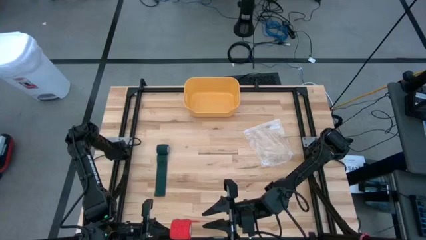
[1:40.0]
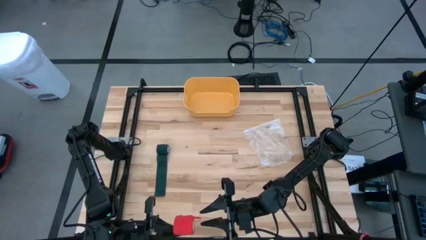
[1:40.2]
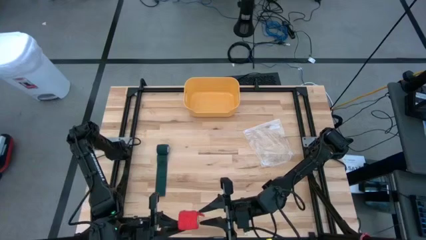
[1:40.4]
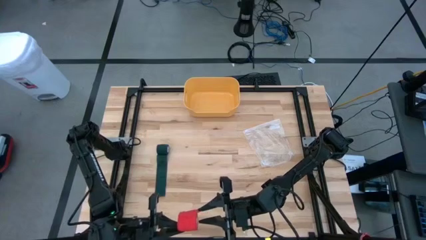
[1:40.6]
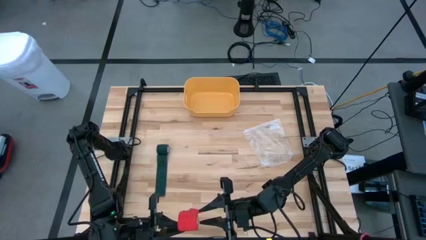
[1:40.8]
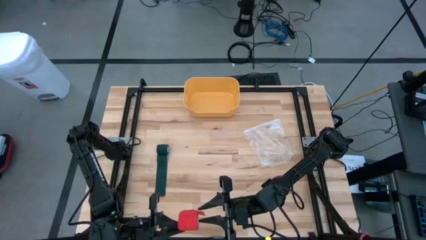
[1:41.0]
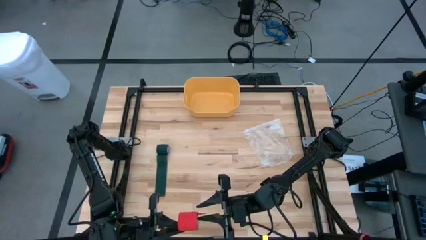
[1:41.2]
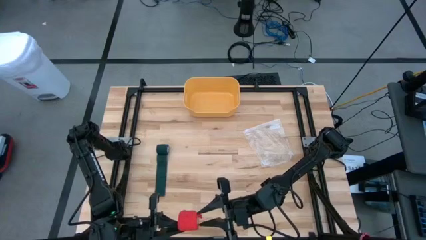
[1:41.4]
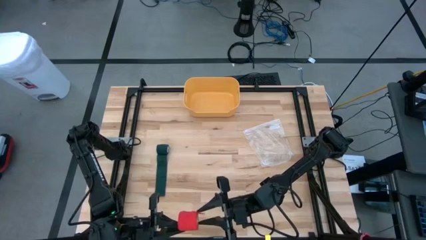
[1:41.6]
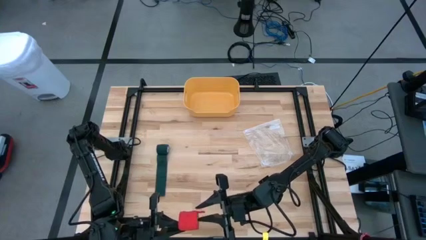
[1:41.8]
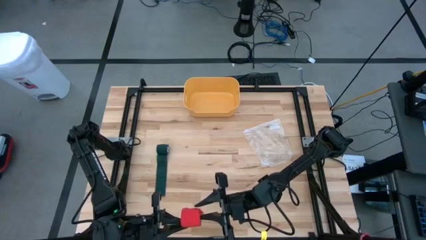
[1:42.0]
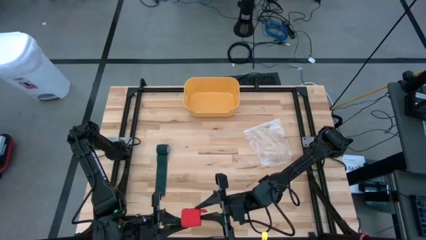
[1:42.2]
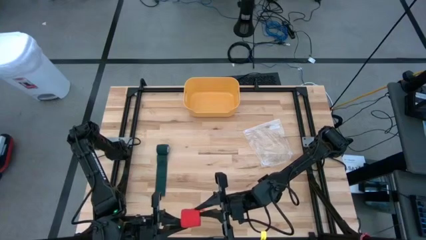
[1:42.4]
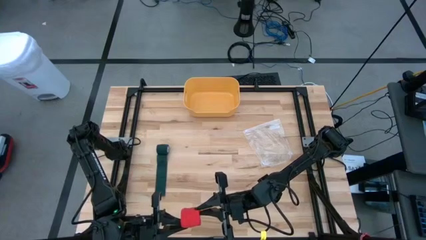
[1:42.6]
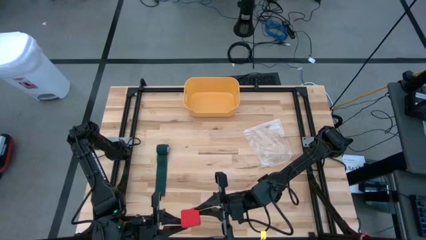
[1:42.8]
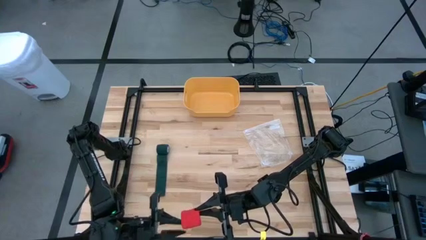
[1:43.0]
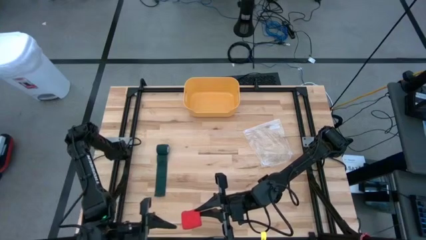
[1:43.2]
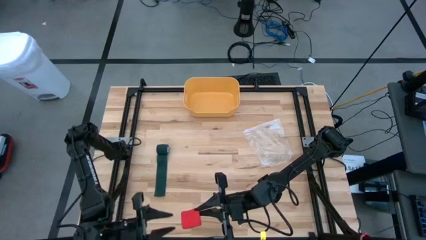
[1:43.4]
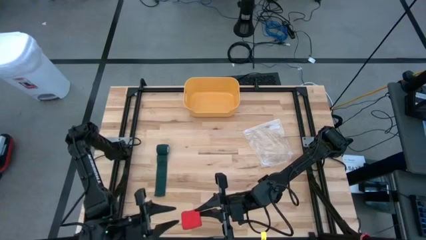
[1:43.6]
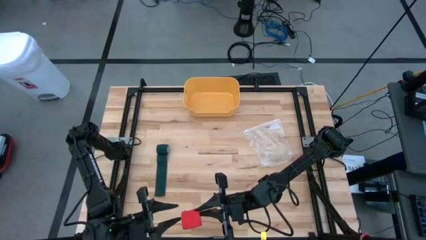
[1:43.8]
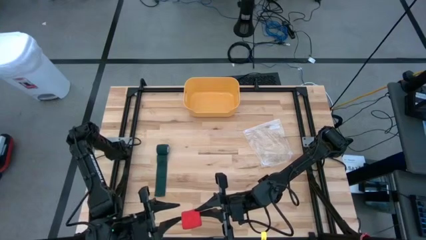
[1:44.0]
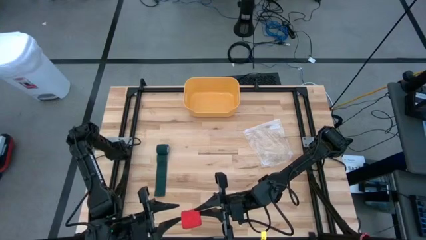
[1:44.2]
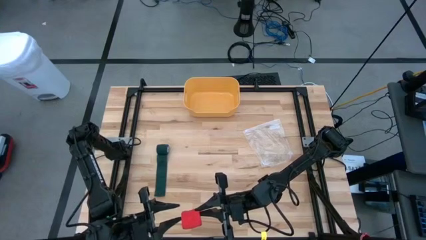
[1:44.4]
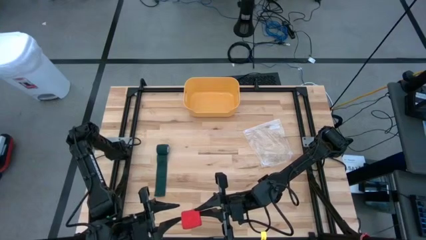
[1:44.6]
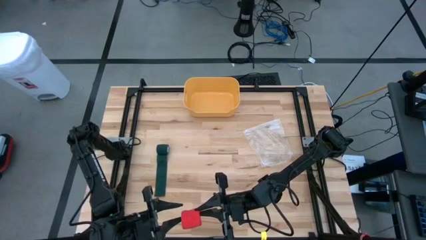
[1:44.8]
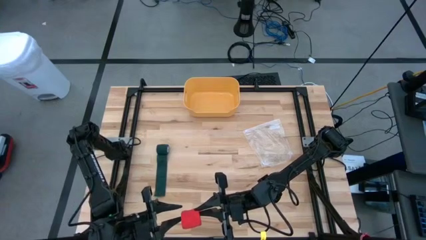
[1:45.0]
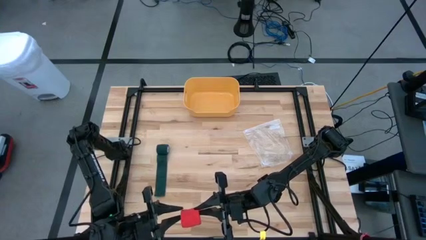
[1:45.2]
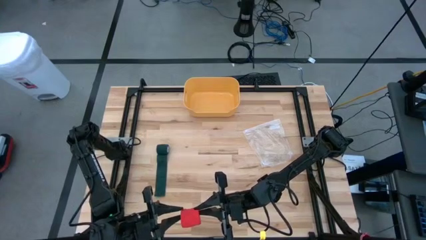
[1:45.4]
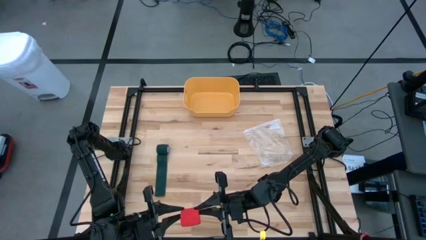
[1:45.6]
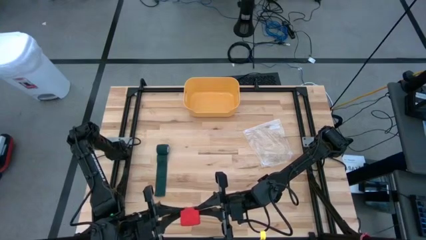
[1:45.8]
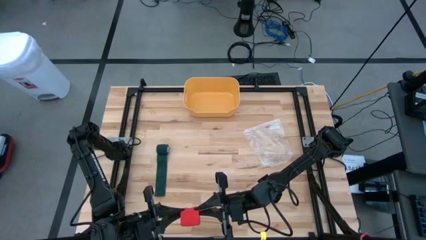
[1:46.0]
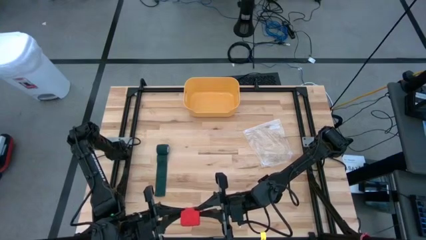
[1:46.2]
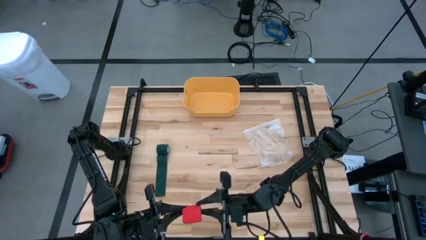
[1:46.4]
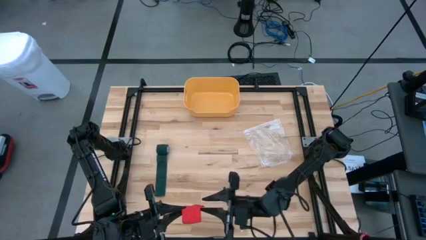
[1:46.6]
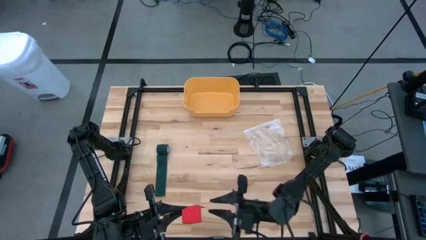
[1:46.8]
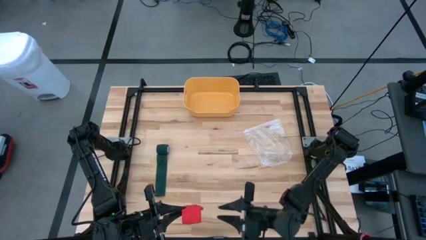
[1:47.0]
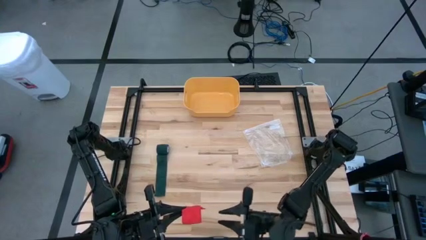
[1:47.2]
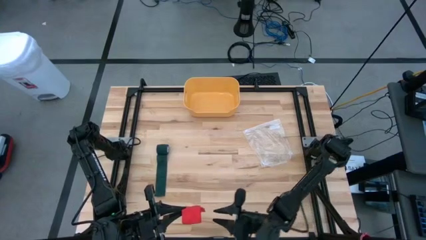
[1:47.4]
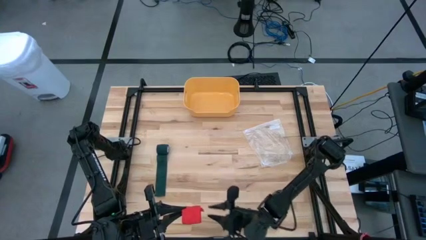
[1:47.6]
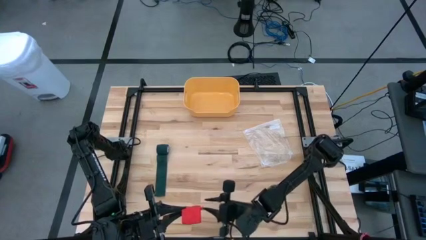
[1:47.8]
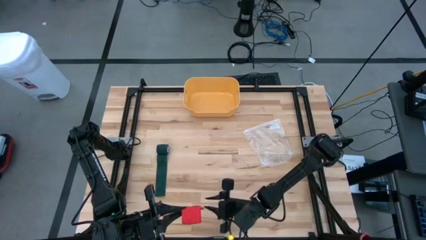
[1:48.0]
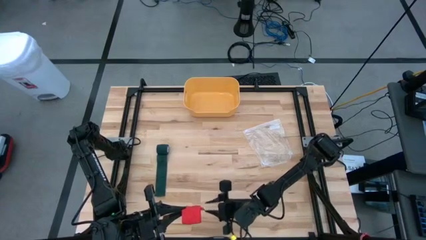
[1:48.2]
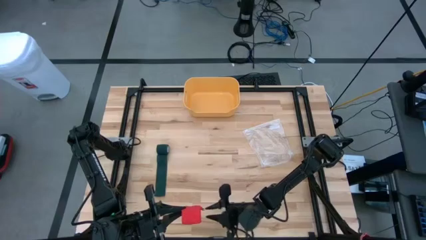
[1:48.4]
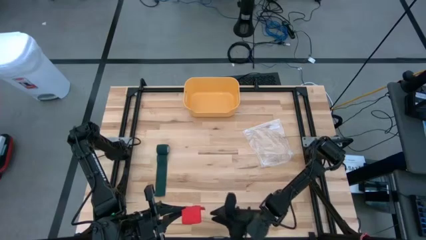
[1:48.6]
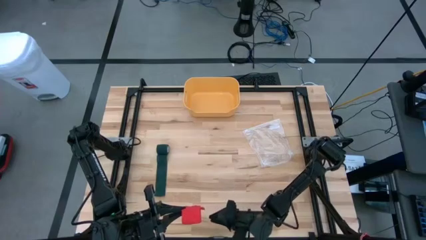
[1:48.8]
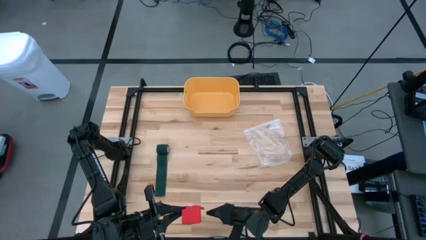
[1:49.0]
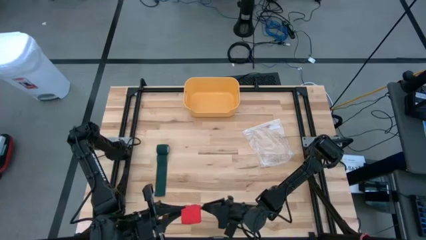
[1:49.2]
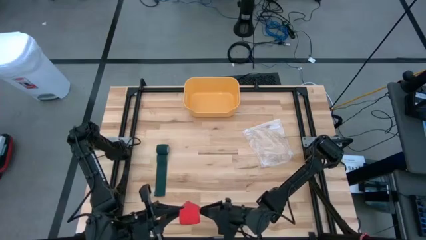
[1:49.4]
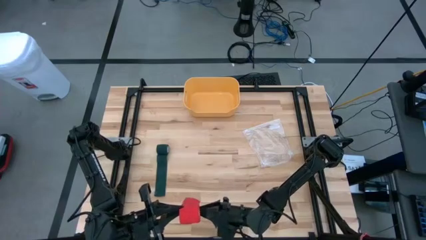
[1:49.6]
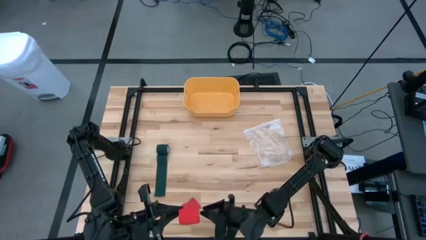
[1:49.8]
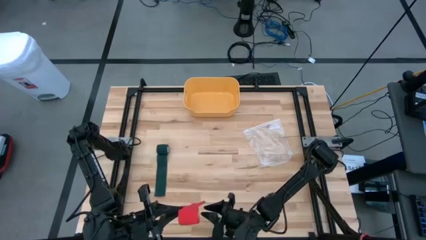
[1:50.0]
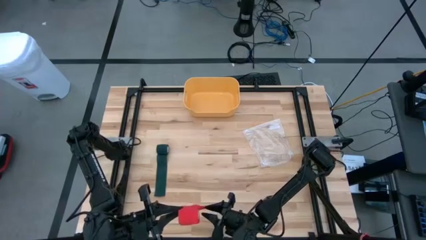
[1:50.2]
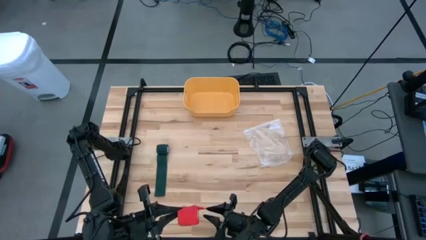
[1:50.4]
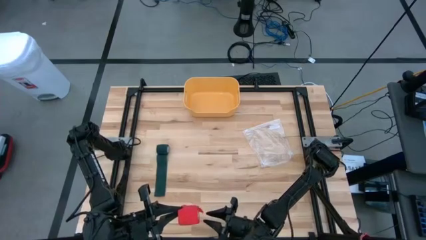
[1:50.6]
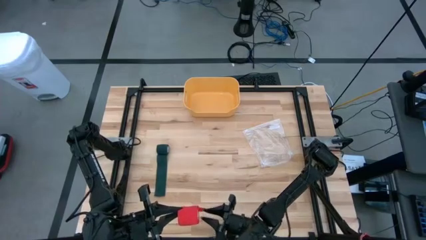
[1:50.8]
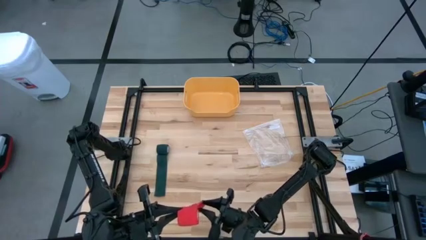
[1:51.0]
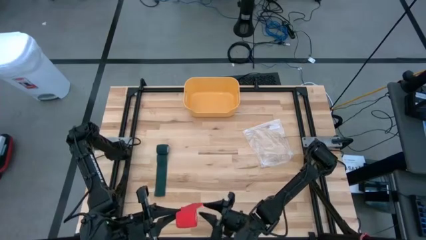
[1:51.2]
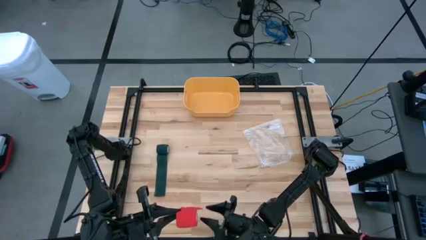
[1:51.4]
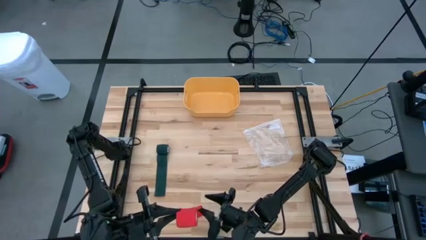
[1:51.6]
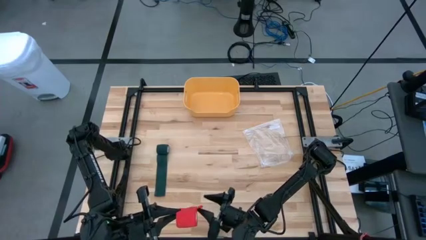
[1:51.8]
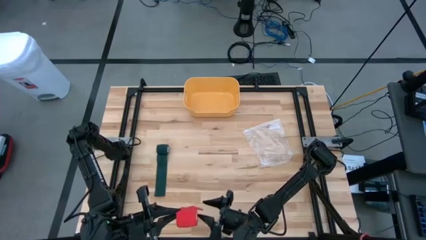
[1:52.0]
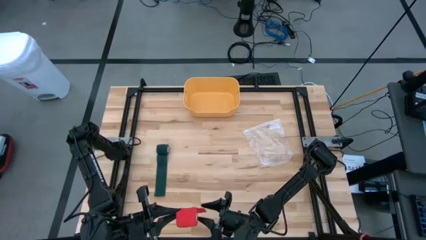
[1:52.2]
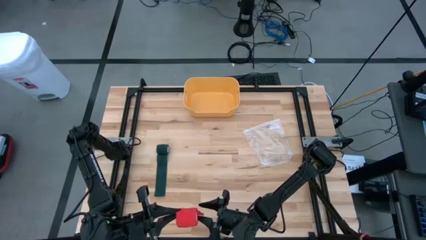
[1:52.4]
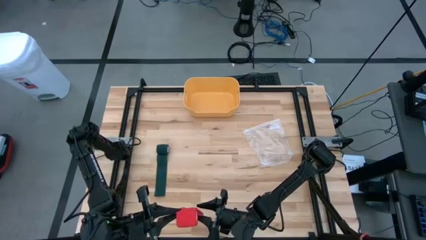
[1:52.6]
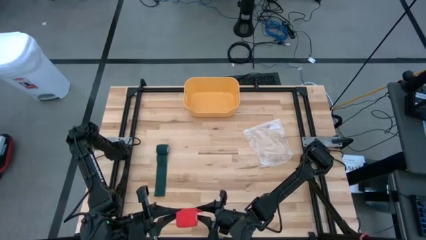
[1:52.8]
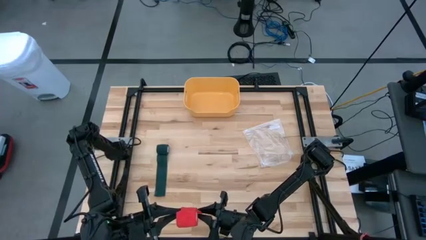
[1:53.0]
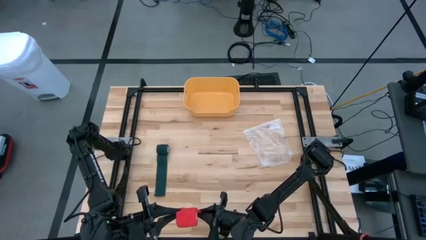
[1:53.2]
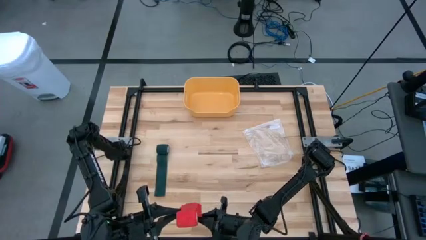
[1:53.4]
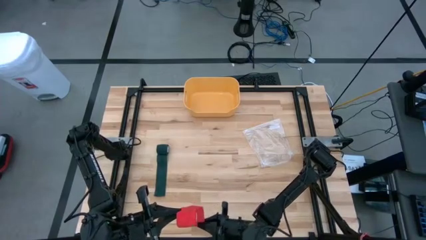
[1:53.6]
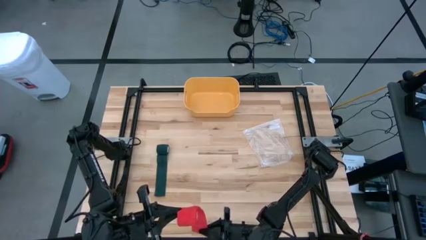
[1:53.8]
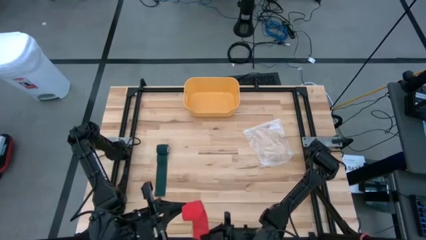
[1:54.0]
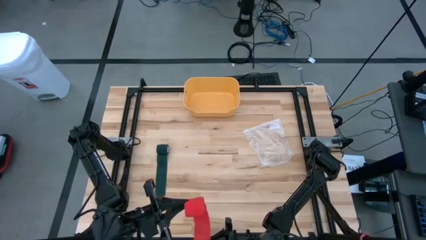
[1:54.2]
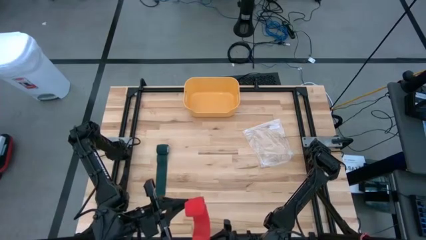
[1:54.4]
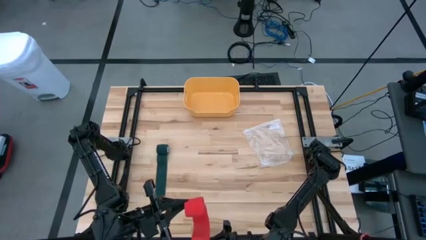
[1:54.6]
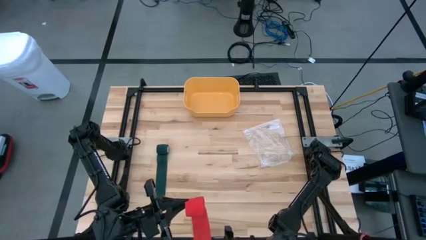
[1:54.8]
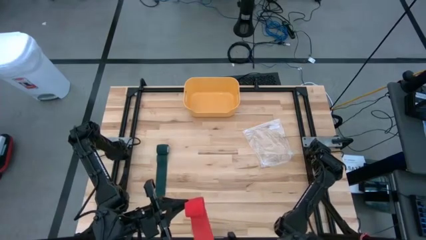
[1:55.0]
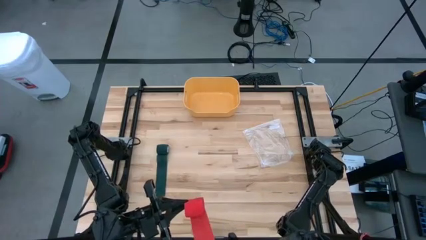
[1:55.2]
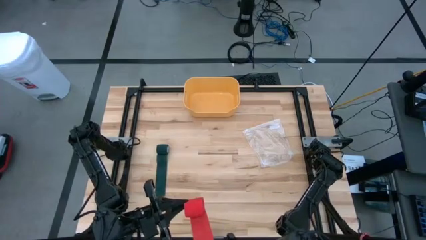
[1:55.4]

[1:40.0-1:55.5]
Task: Roll bandage
Roll the red bandage
